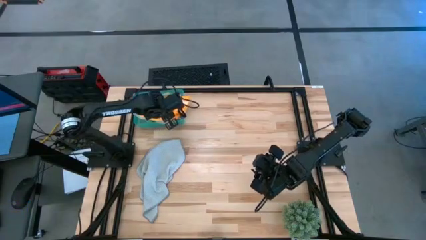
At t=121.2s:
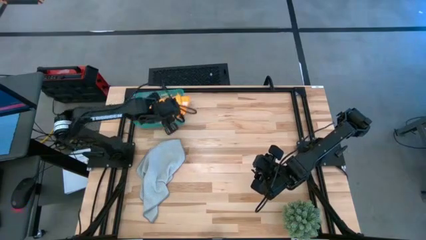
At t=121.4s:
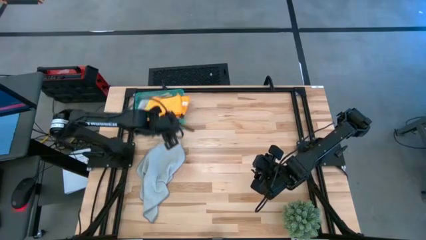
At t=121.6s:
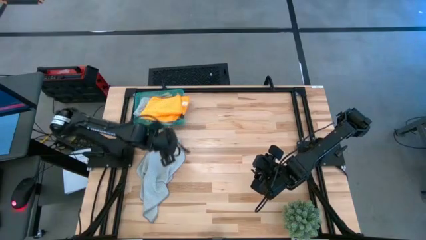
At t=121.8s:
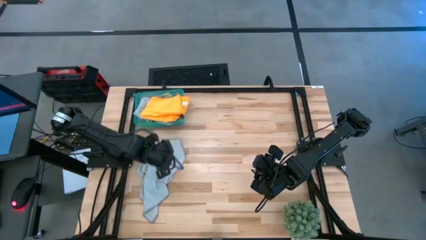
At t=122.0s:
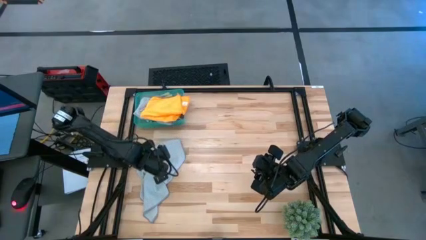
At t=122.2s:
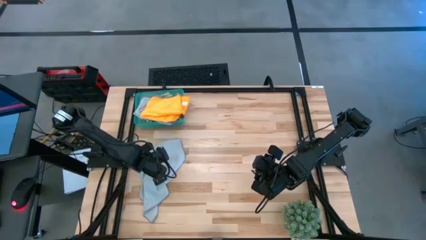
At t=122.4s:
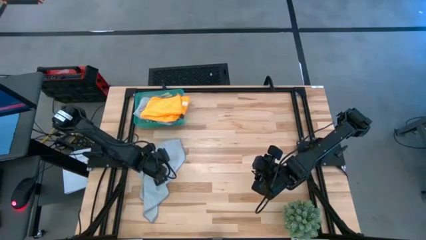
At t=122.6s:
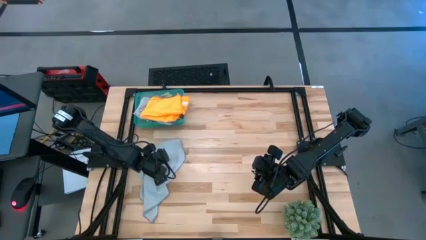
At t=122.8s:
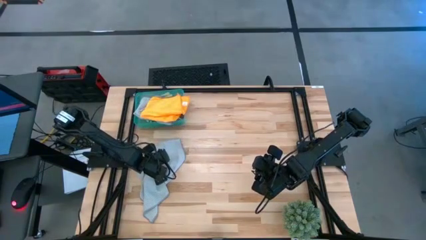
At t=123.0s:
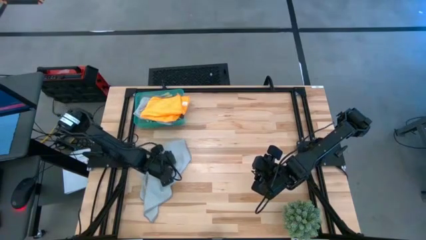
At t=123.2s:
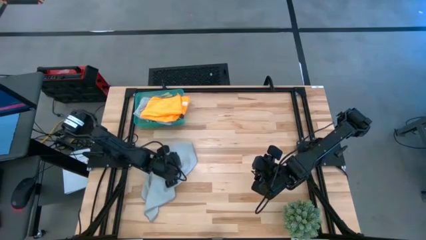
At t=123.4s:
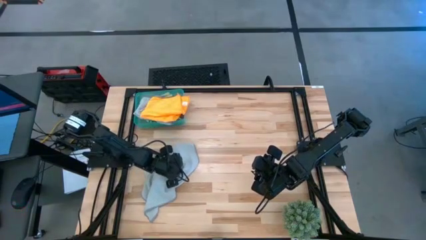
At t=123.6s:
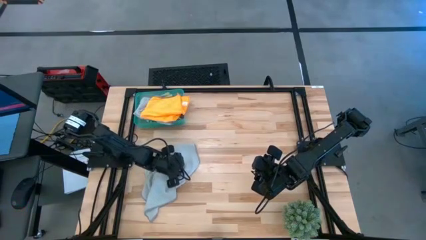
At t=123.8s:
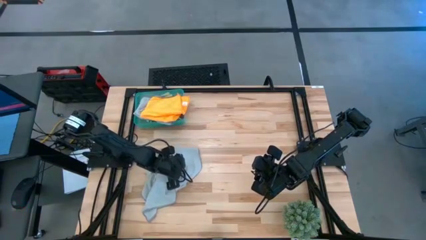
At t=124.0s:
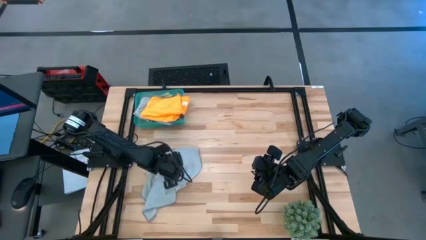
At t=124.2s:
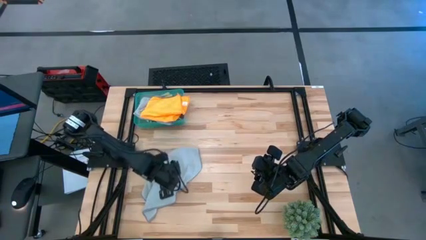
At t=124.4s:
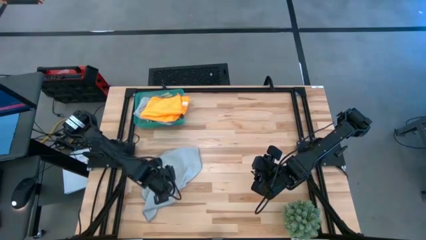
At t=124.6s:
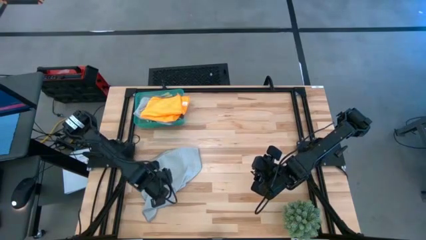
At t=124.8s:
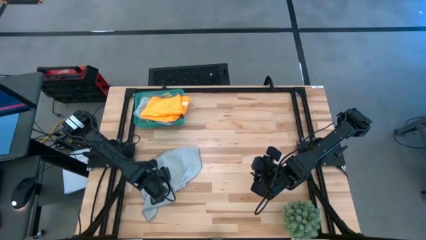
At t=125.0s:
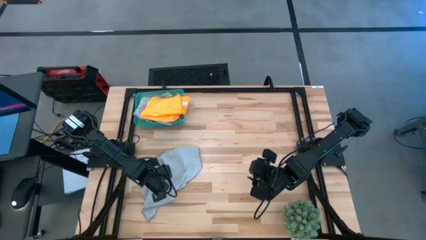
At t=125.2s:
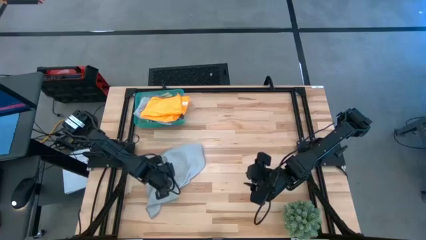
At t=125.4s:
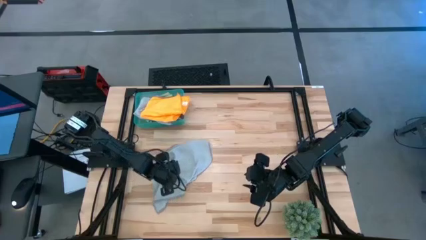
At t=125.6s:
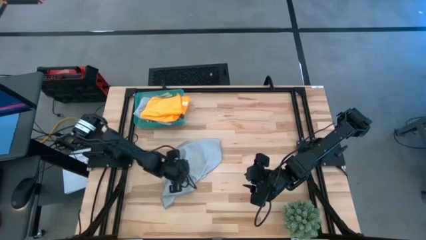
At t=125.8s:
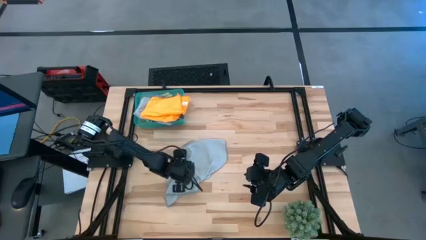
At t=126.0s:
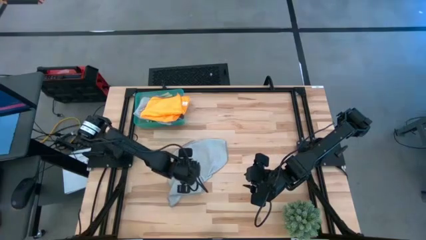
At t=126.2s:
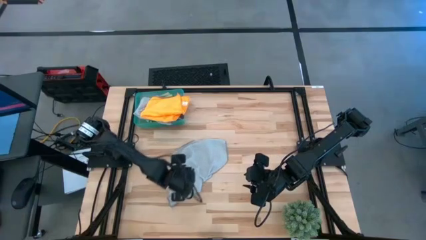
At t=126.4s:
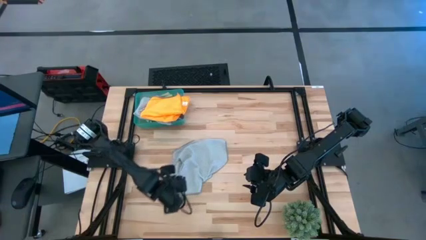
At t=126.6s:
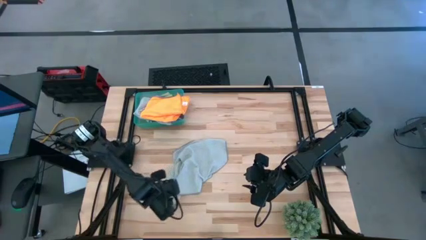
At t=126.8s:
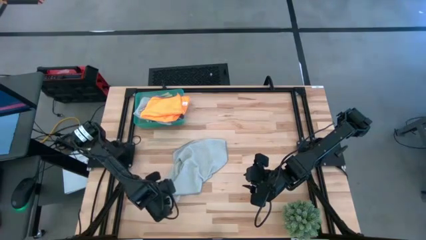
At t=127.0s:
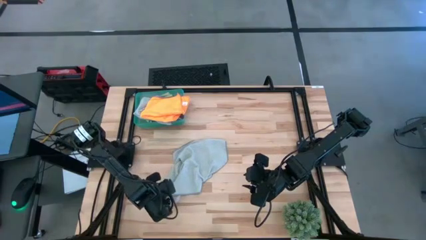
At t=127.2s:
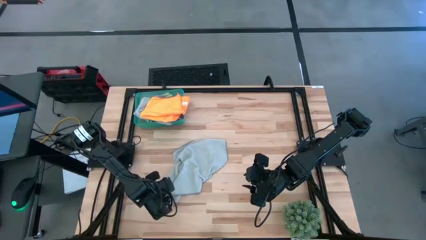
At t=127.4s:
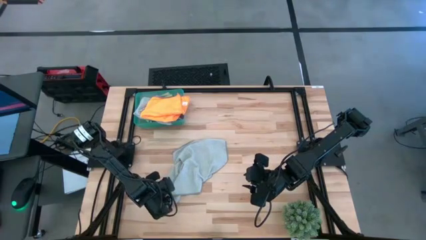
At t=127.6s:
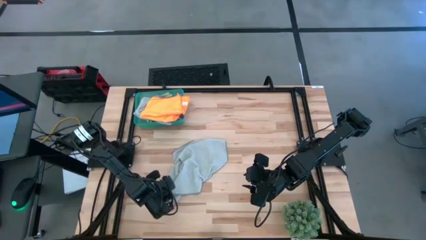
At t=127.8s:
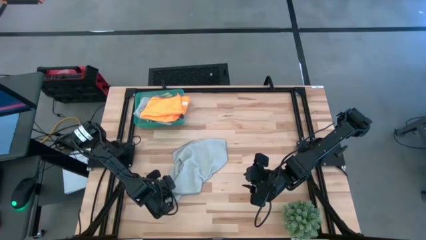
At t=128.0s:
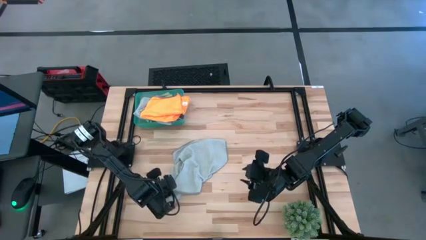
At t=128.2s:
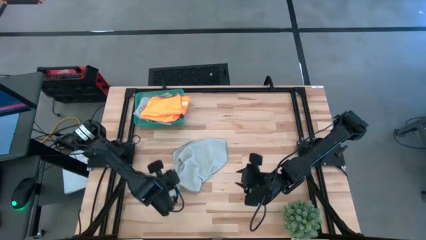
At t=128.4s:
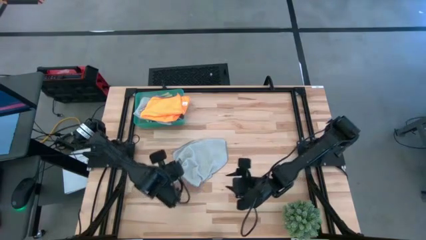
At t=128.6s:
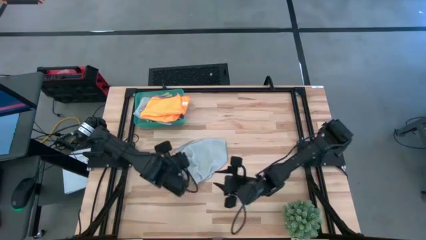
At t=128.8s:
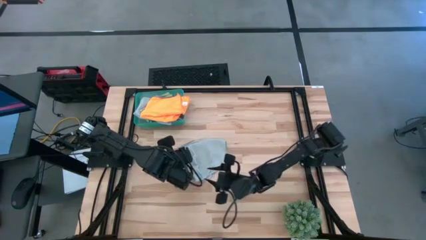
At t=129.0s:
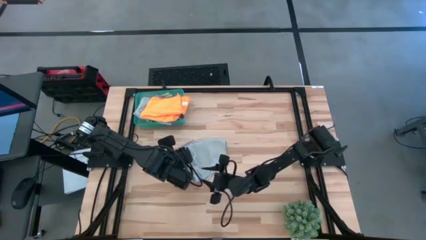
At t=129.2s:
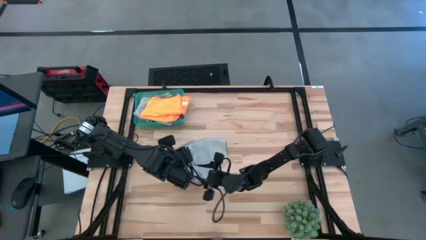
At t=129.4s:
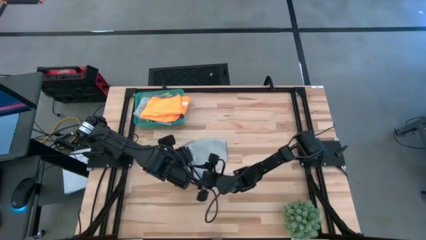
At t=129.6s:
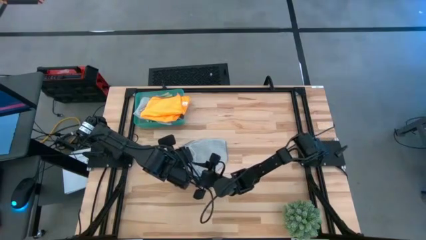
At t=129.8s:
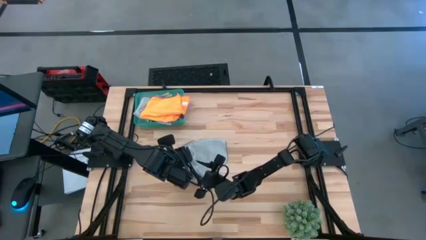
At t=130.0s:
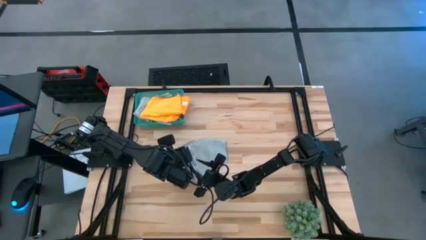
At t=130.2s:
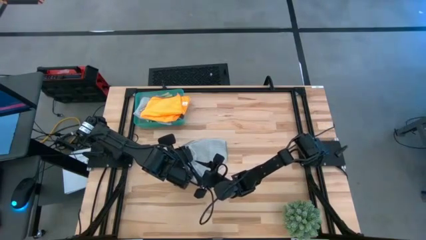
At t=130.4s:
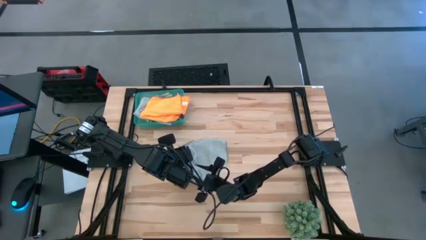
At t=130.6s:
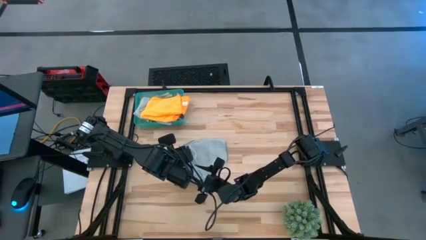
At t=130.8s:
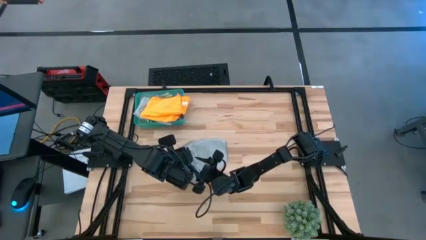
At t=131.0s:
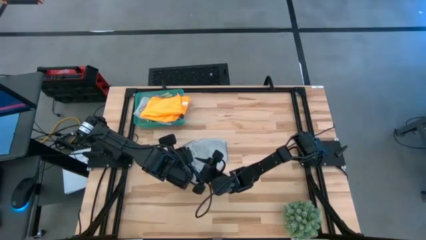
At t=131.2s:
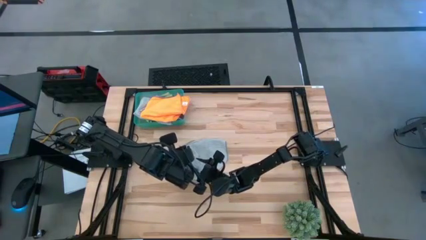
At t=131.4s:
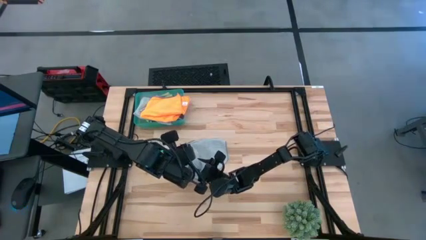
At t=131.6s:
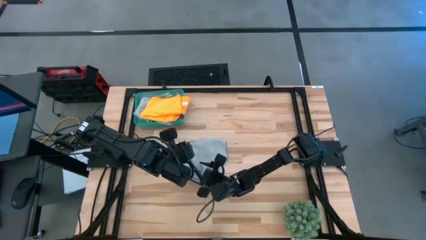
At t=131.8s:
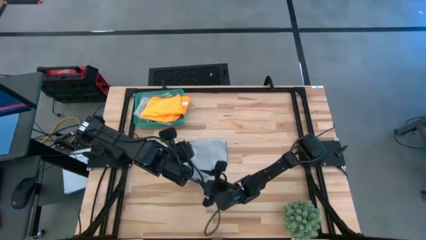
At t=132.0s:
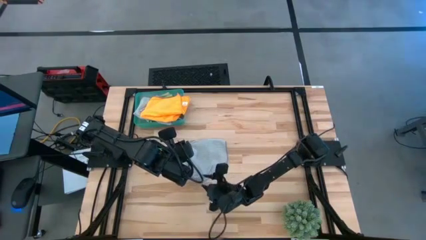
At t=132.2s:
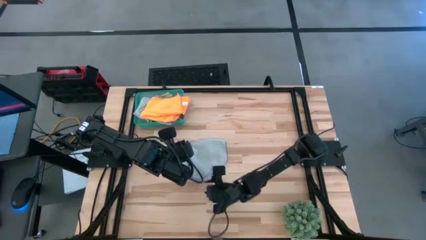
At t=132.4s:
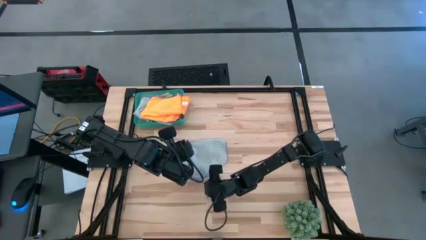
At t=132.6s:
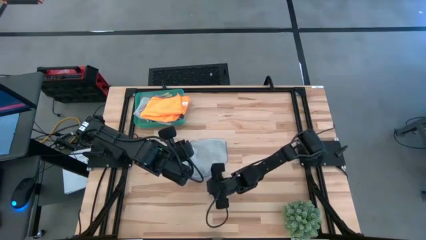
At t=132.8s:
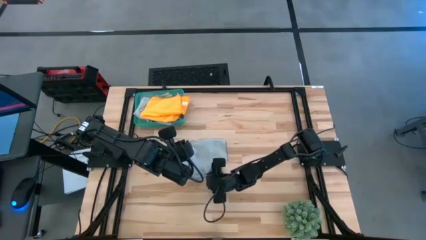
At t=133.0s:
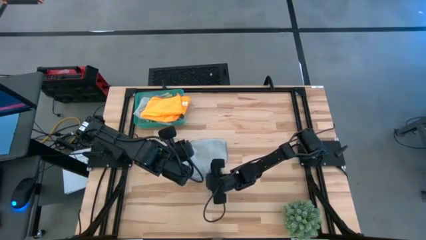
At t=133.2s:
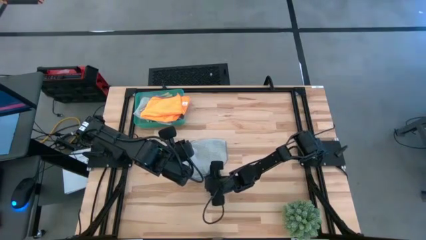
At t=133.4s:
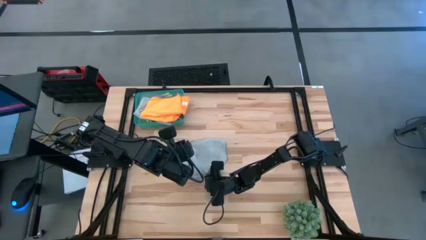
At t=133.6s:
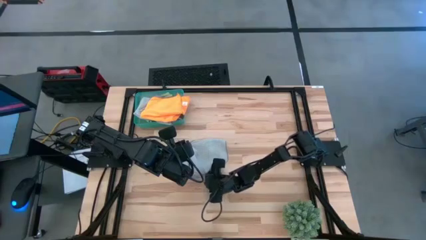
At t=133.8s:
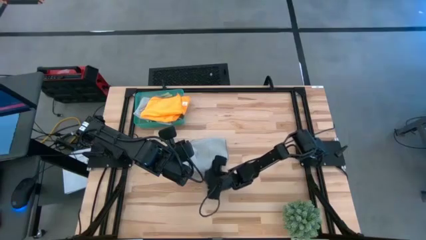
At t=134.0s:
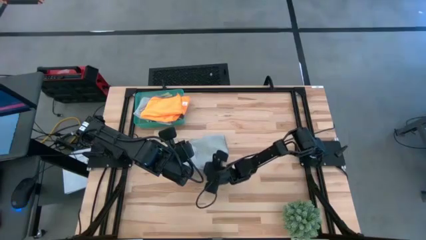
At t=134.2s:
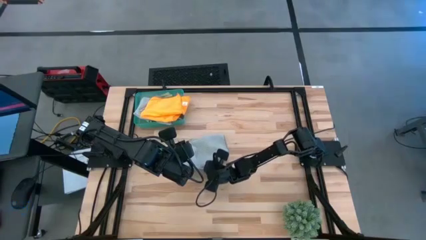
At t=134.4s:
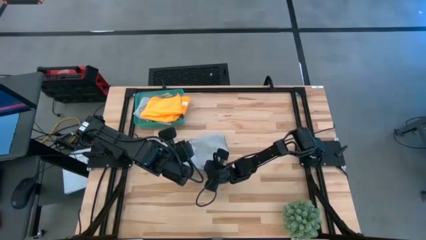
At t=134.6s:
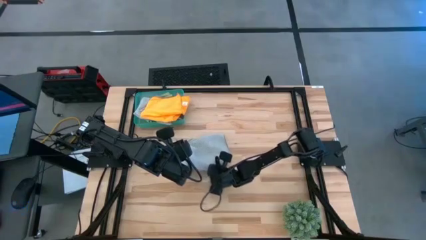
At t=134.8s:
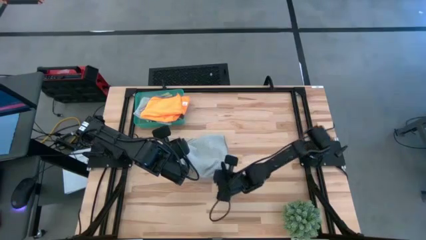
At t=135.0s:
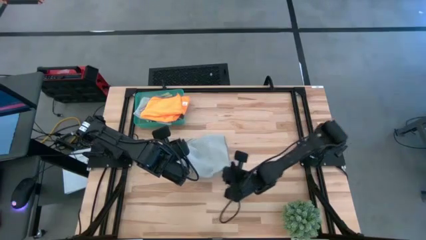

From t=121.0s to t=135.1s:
Task: Fold microfiber towels
Fold the gray towel

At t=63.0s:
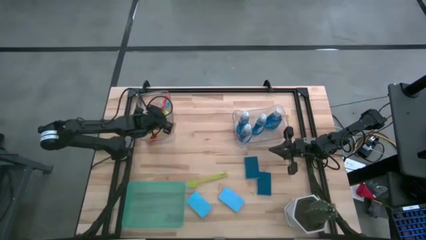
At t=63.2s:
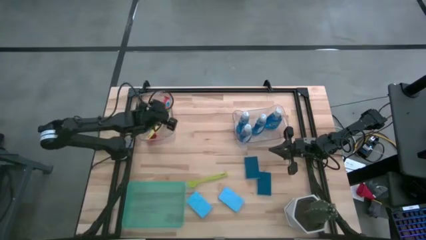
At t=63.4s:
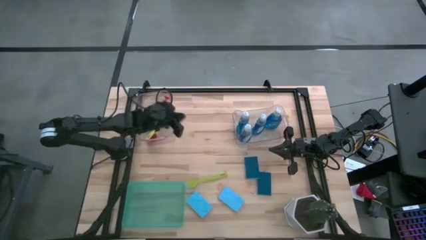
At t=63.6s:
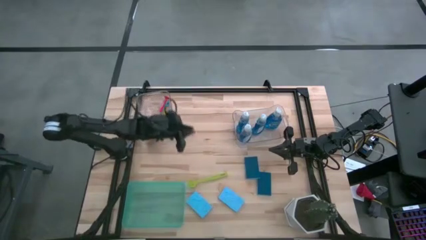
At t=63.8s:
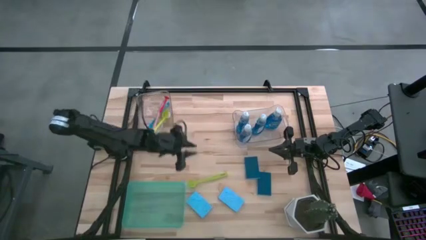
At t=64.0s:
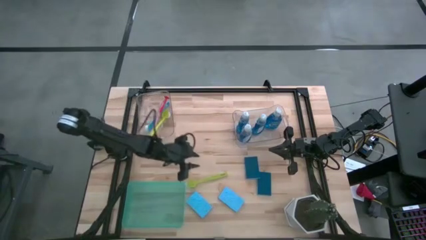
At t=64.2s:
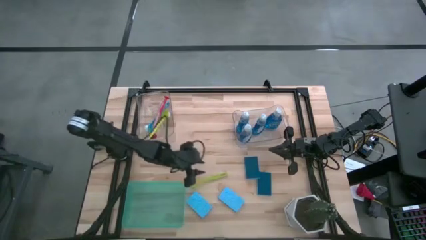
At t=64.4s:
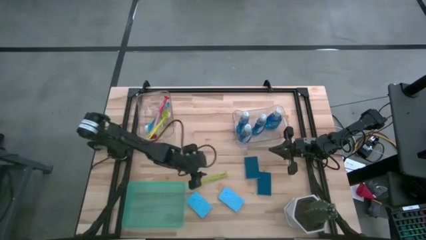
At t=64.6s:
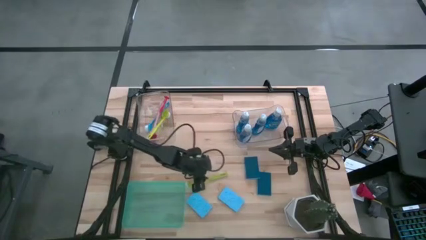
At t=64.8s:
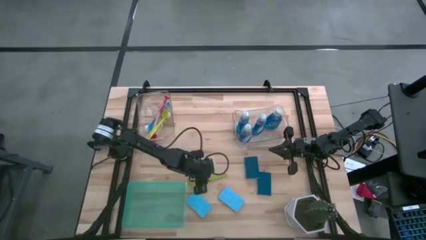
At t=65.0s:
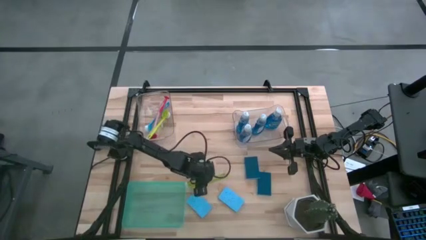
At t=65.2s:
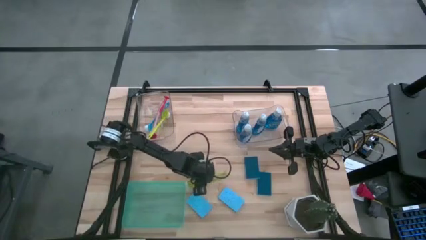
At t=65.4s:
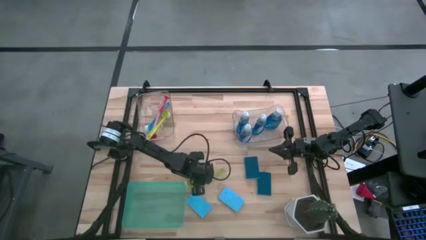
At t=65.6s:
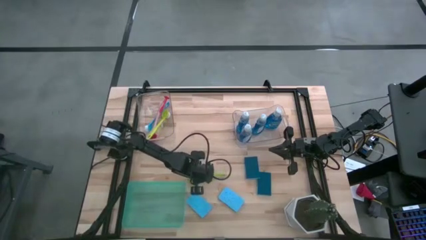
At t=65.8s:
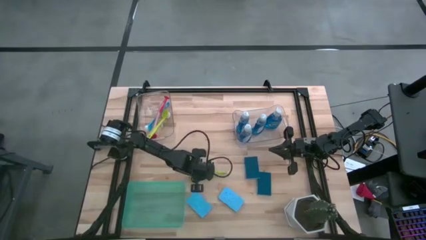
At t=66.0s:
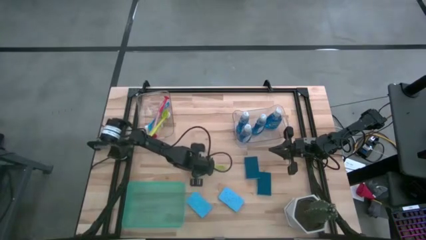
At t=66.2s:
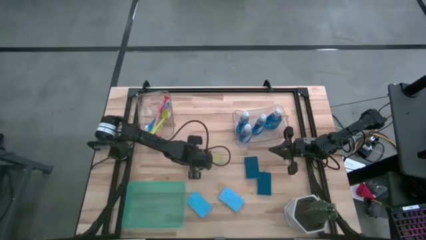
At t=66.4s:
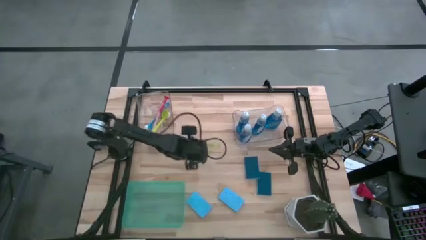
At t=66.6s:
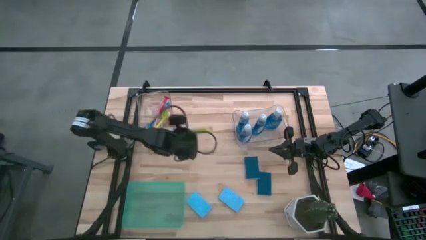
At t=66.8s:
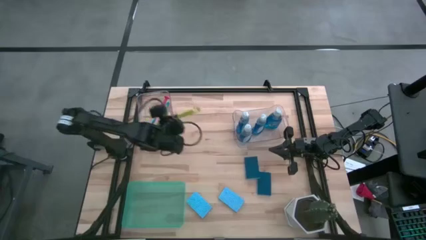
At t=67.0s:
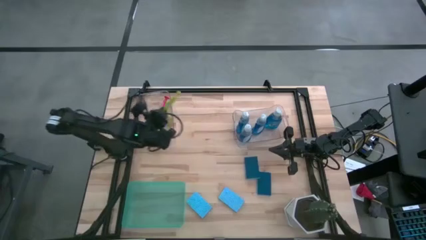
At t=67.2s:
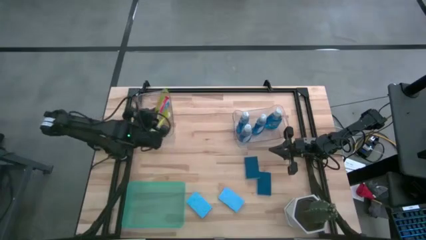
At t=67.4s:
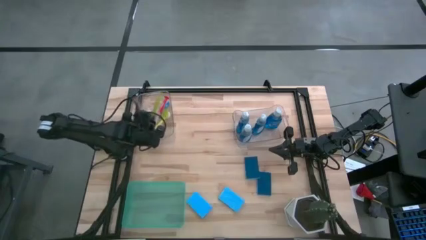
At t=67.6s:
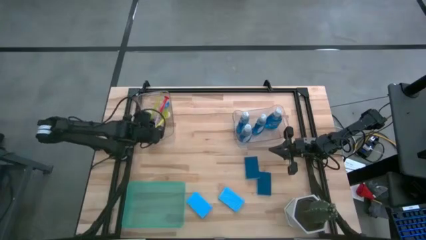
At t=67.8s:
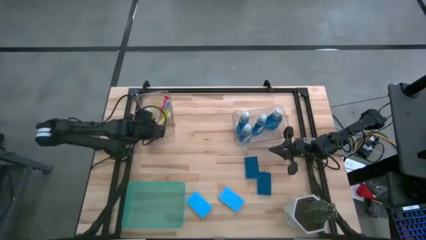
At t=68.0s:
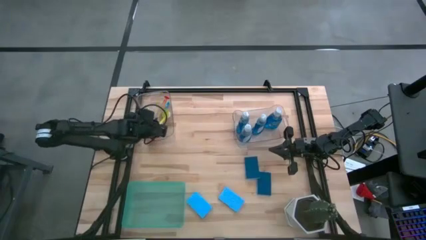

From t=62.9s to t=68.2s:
Task: Pick & Place Kitchen Sink Supplies
Put the light green dish brush into the left transparent bin
